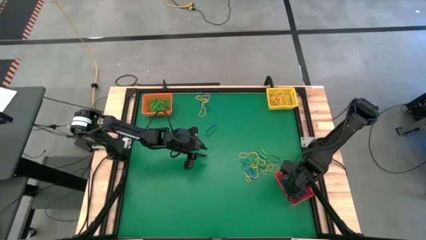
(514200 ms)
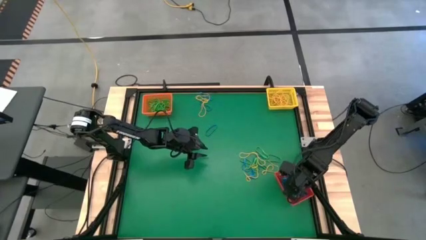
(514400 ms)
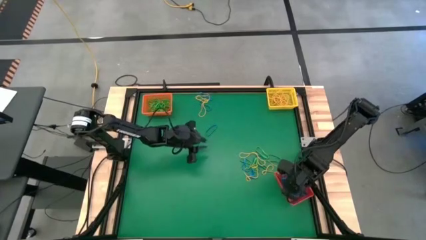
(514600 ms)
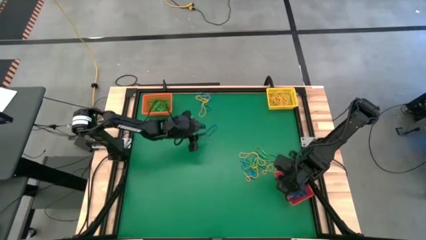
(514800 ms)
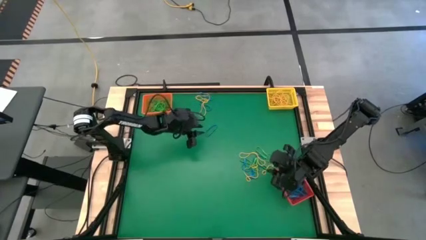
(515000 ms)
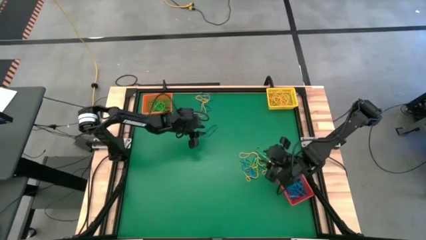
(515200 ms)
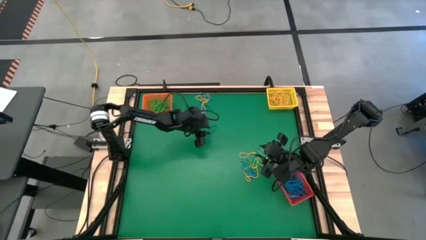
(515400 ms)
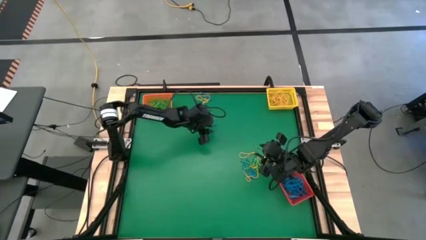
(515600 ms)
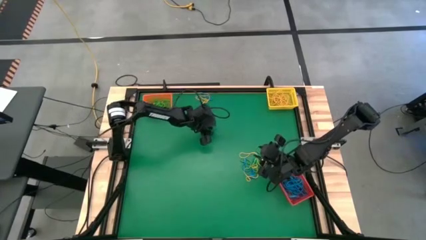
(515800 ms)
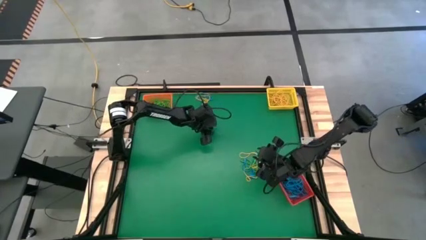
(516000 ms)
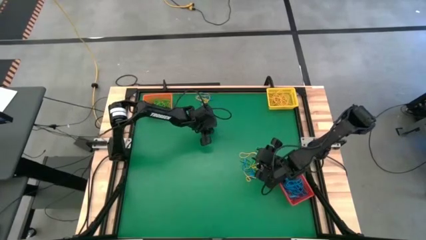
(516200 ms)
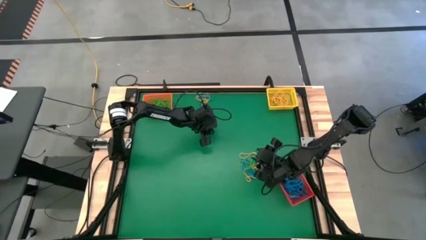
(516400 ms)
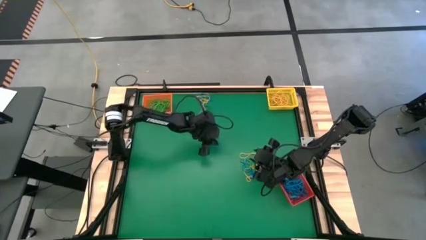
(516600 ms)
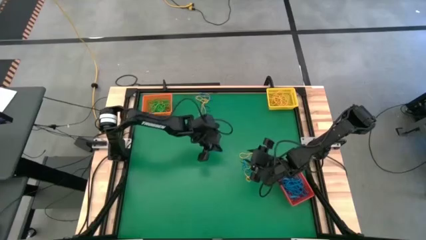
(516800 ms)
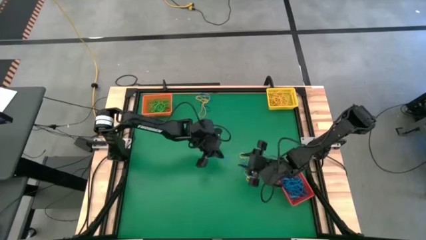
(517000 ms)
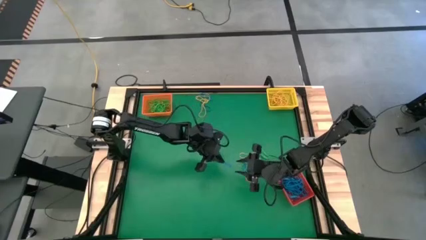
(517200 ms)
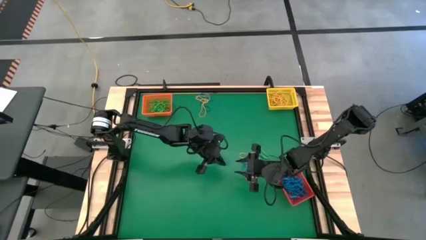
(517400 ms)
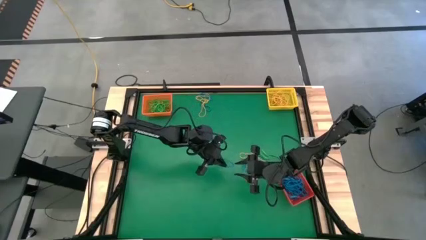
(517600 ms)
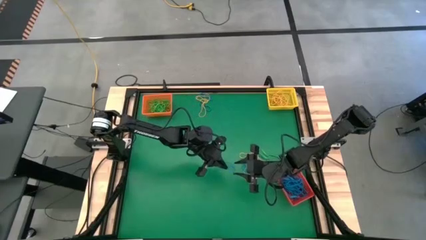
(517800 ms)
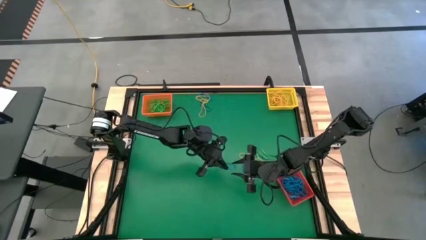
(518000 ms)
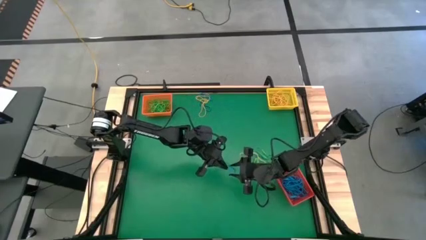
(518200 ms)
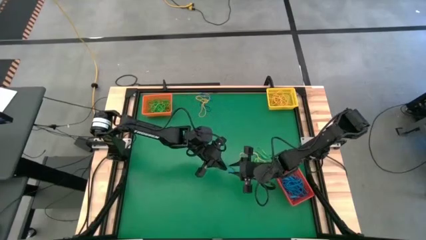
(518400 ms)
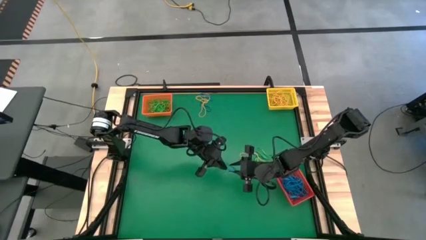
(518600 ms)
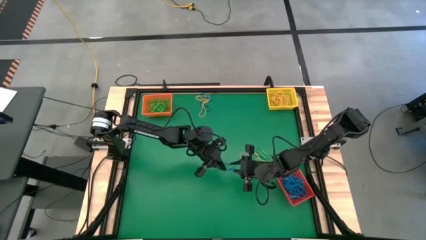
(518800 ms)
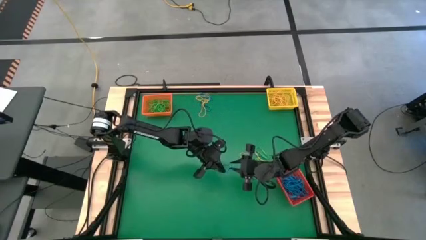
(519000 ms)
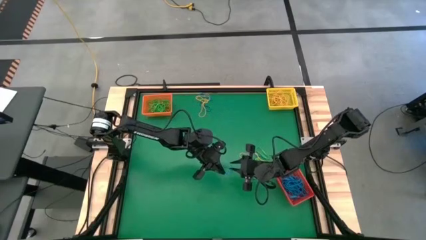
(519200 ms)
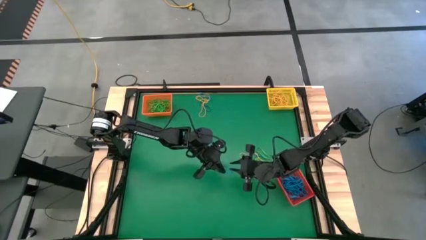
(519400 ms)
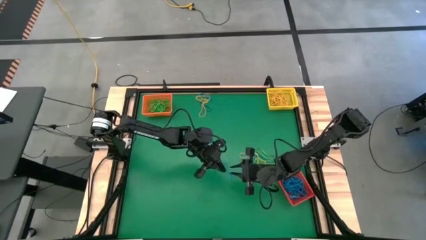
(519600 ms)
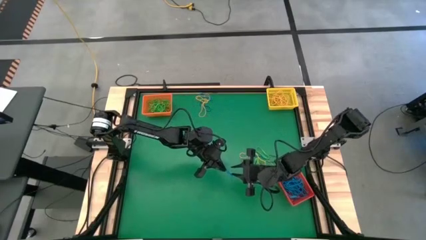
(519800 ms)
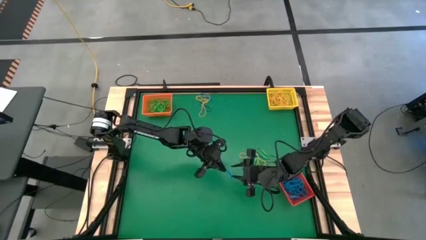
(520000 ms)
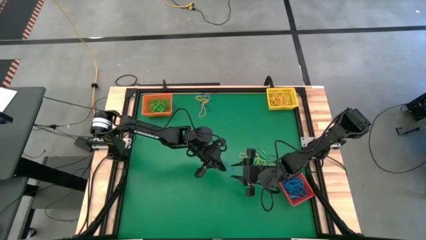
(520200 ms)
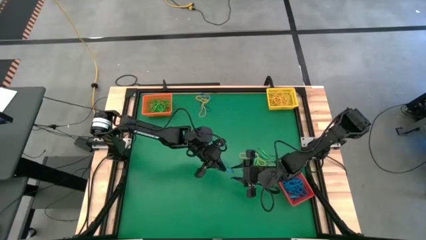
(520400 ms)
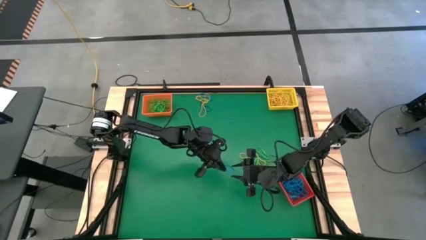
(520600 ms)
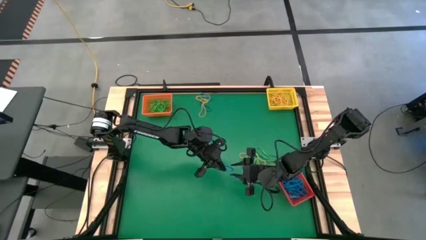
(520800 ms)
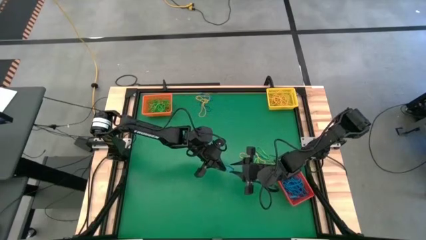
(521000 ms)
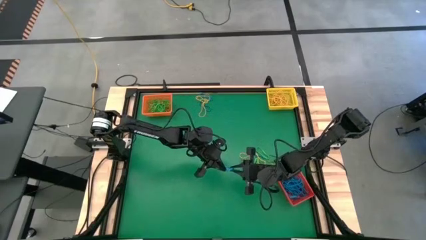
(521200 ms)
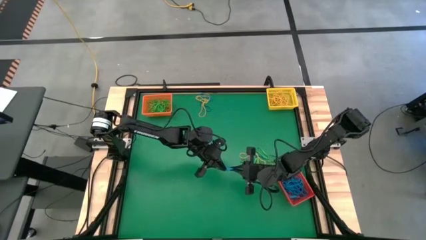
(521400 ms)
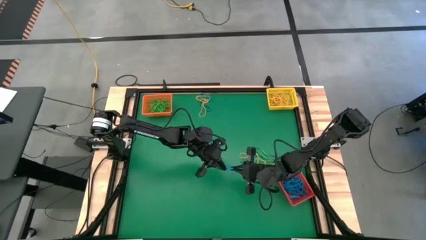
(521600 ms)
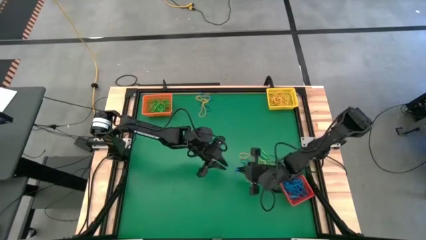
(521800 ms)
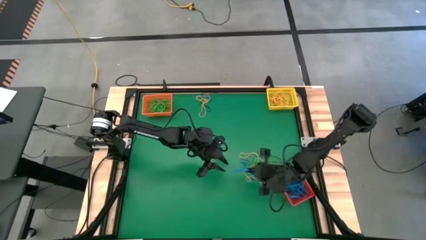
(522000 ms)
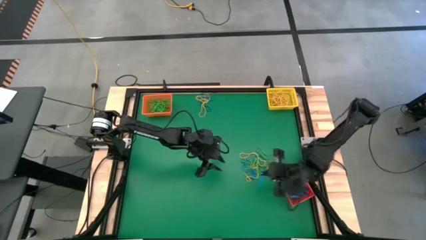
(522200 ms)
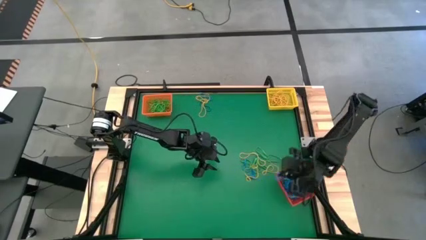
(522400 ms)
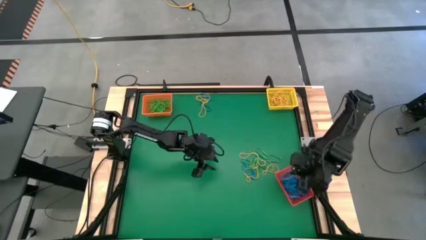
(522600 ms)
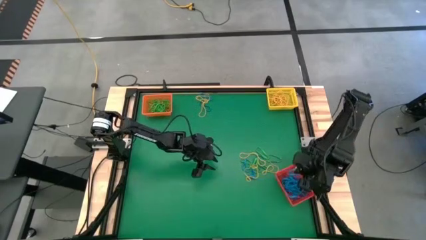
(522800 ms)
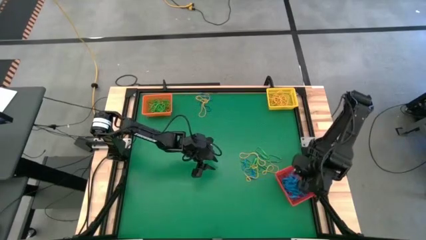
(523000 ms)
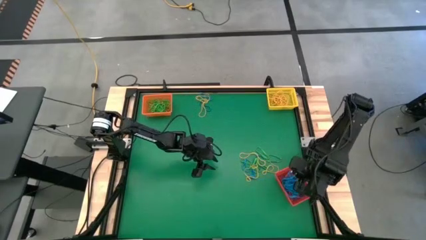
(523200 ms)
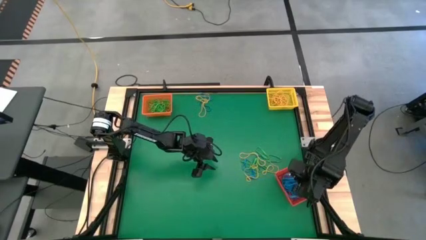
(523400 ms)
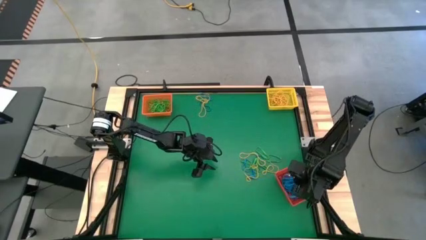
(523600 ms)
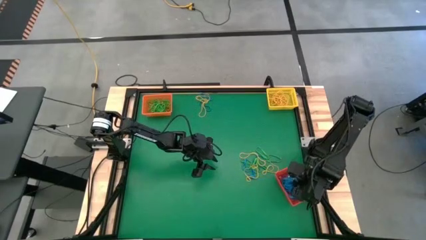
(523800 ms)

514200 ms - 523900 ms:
Task: Sort rubber bands into baskets
Put the blue rubber band into the red bin

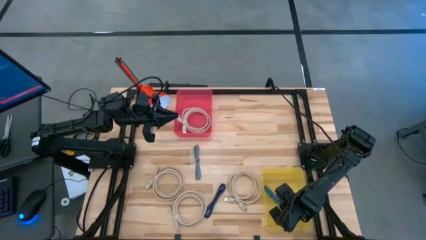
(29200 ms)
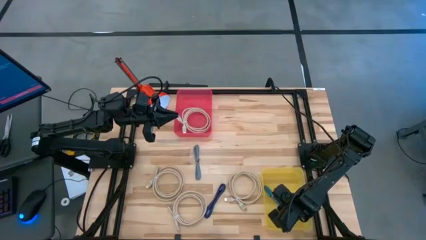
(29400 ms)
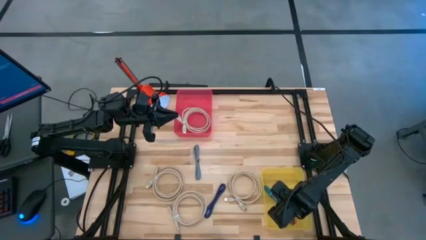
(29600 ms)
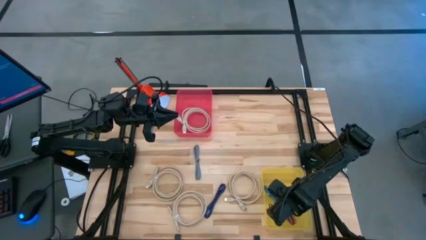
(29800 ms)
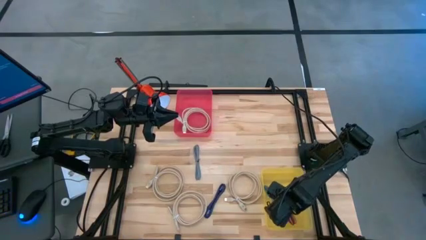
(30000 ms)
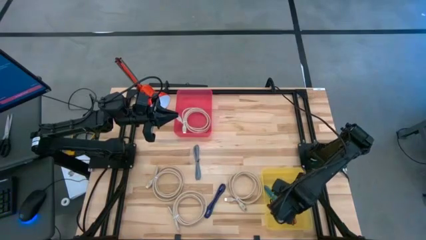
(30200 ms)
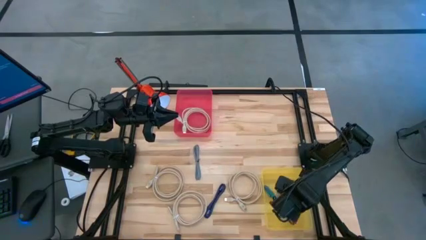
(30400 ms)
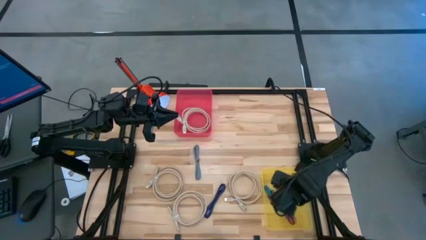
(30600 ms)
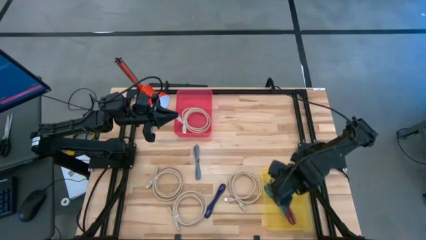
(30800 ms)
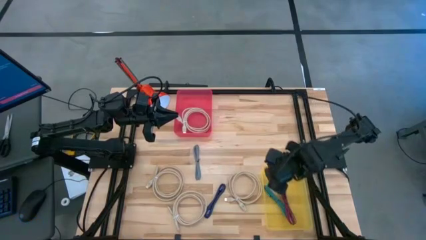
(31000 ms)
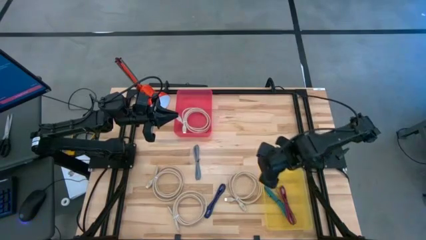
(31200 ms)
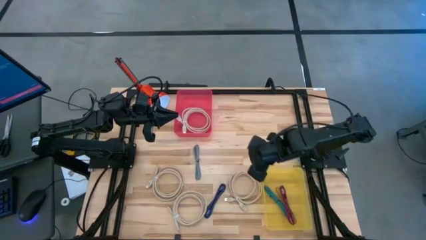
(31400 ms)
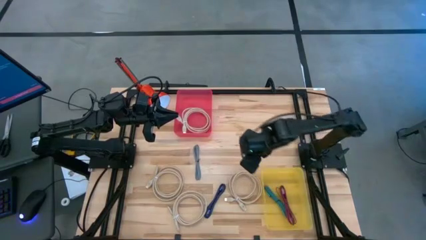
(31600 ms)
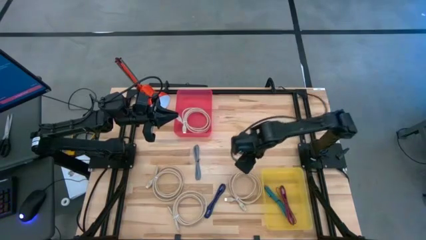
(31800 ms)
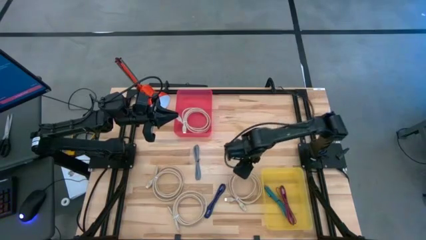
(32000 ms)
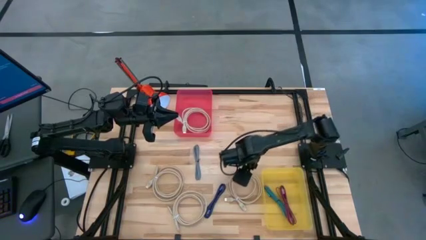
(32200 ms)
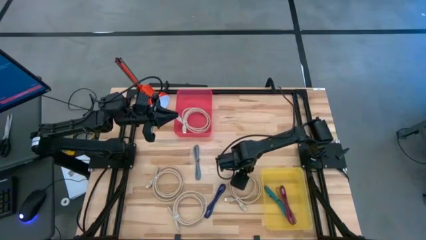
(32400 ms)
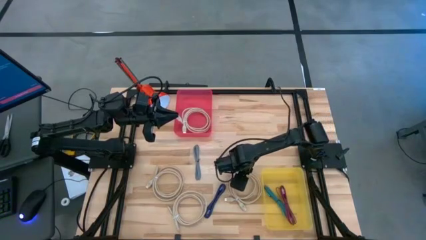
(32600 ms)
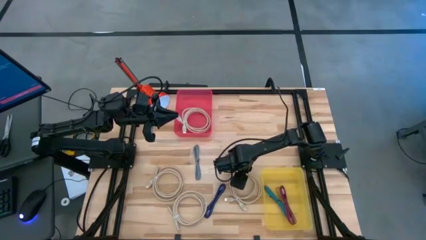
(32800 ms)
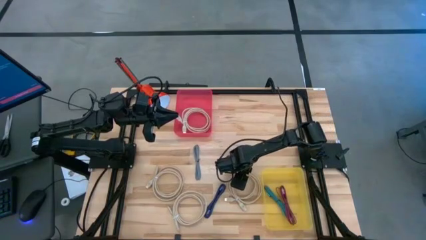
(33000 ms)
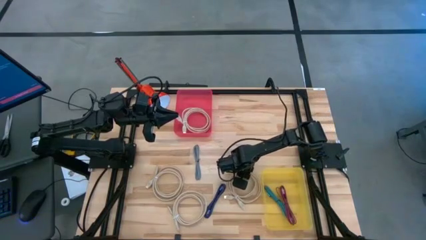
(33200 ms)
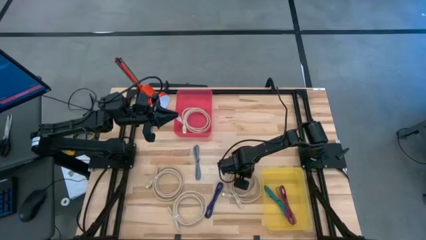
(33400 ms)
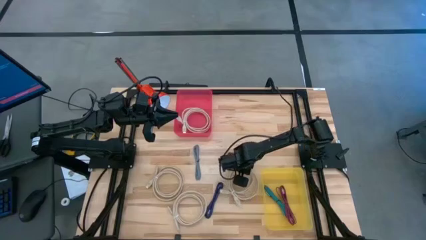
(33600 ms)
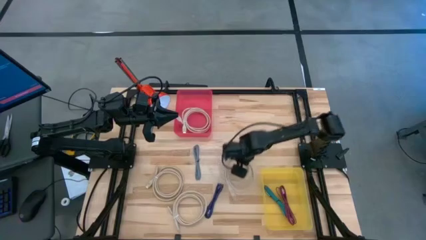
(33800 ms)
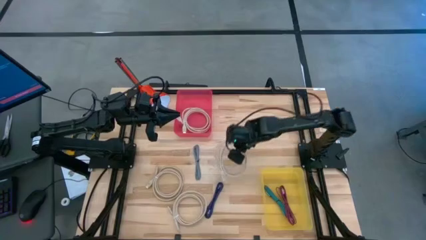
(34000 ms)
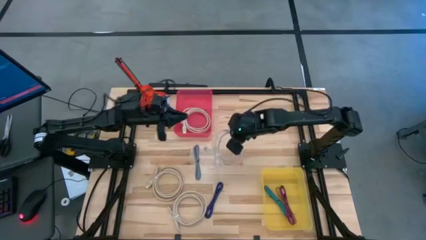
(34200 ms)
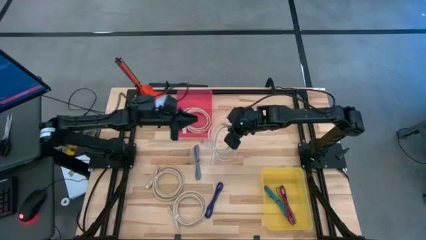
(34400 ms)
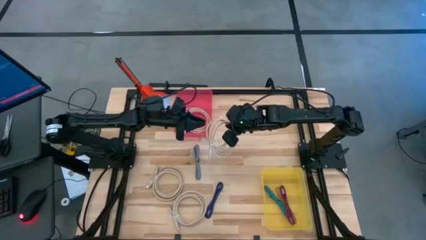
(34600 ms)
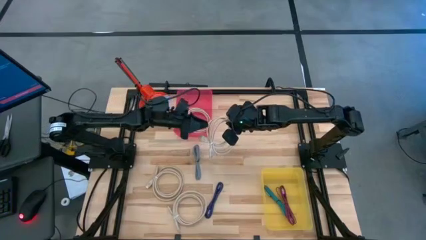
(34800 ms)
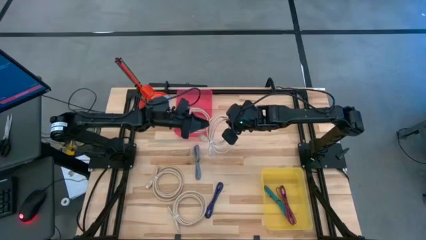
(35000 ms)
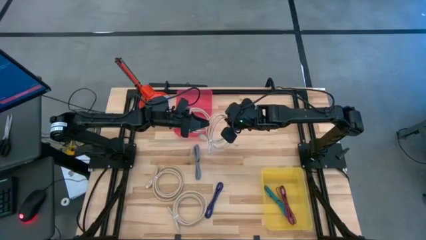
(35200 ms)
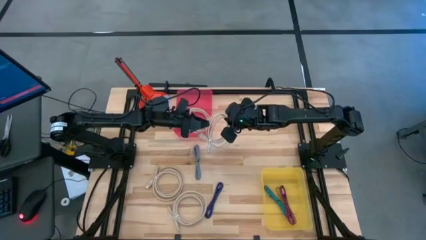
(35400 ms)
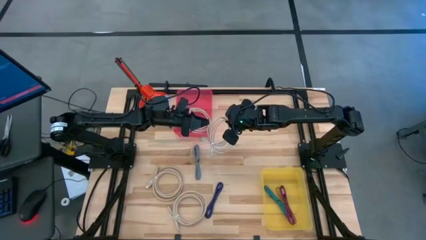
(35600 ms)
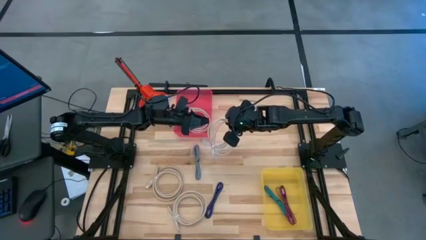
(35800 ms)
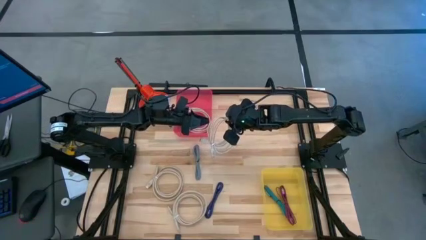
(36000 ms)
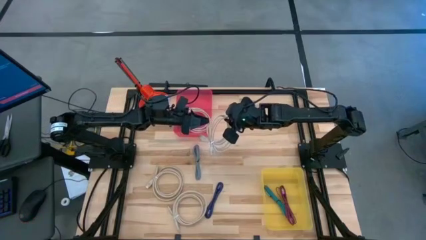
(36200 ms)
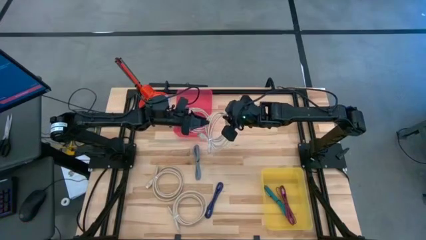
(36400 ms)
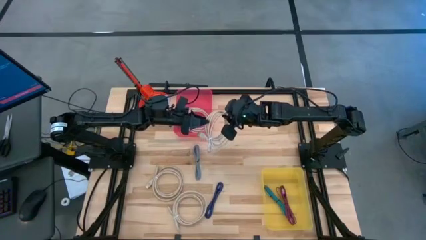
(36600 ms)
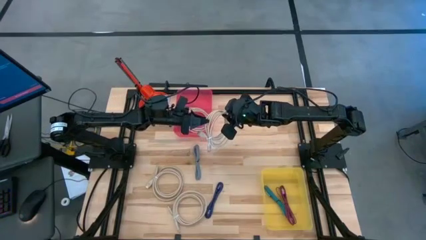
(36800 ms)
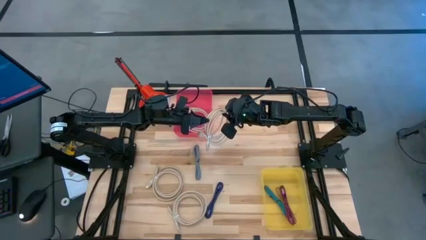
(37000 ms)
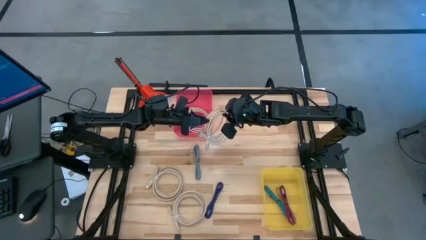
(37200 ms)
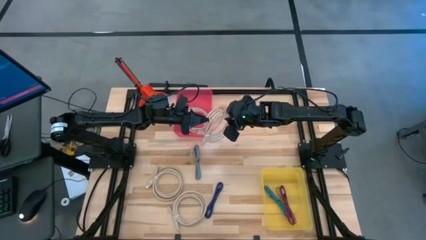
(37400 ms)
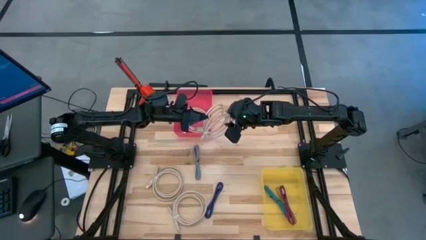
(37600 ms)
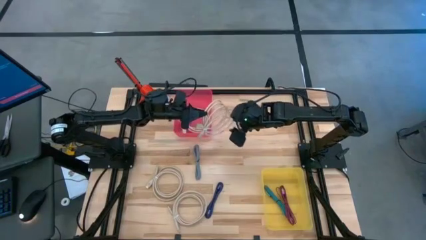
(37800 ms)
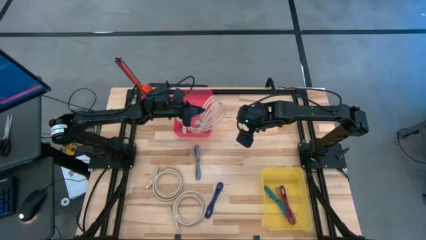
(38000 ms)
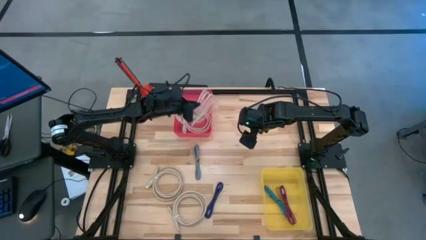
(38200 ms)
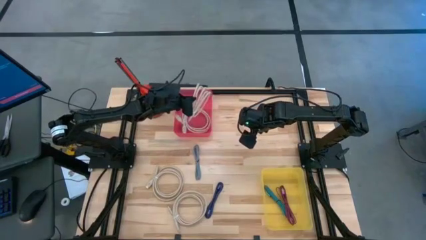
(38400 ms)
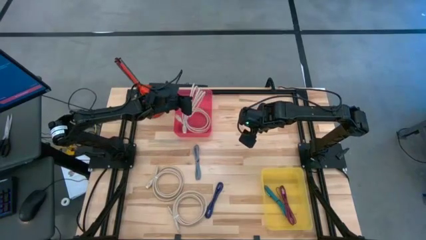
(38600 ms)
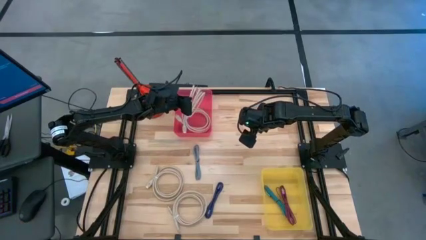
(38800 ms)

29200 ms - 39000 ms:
Task: Pick & Place USB Port
Put the HDMI cable into the red bin
